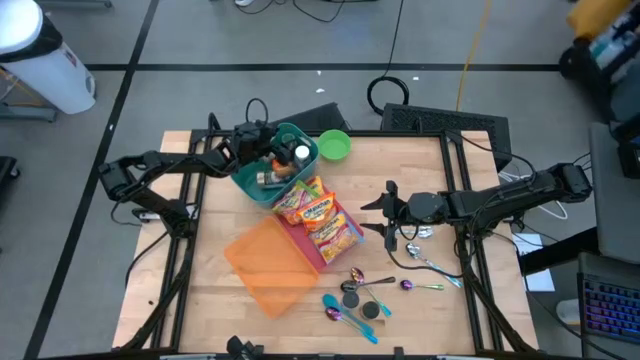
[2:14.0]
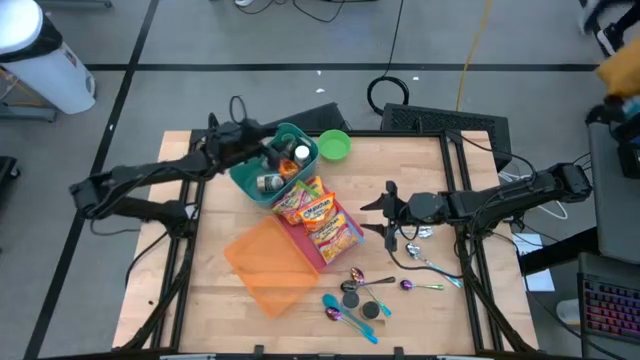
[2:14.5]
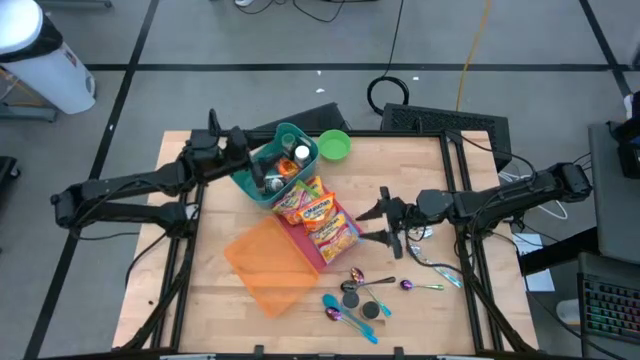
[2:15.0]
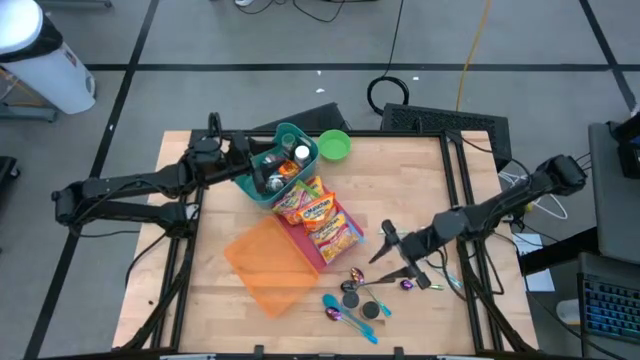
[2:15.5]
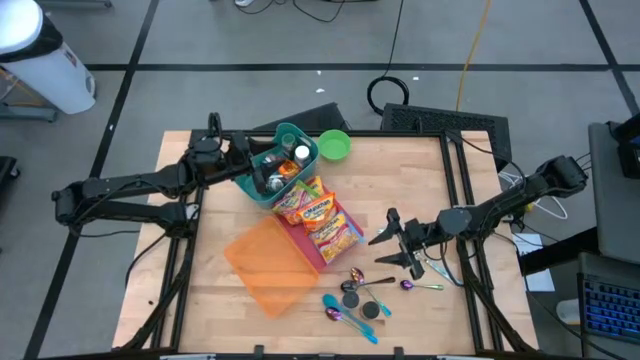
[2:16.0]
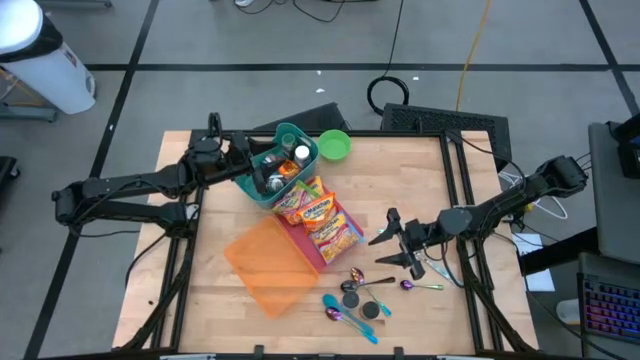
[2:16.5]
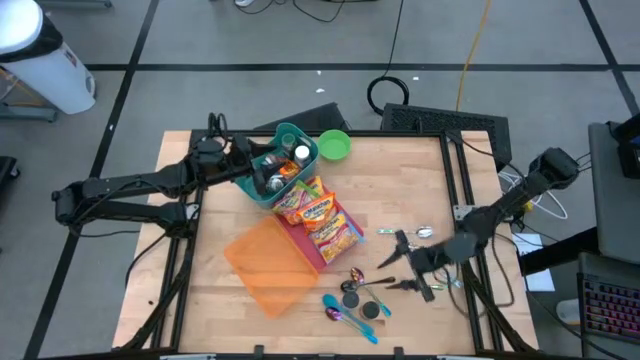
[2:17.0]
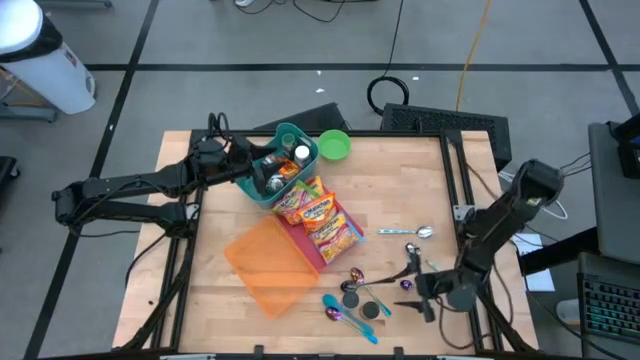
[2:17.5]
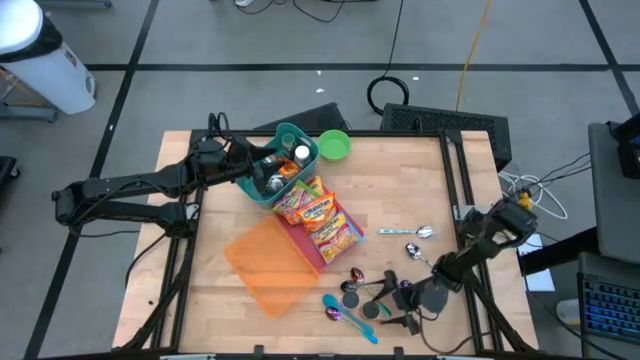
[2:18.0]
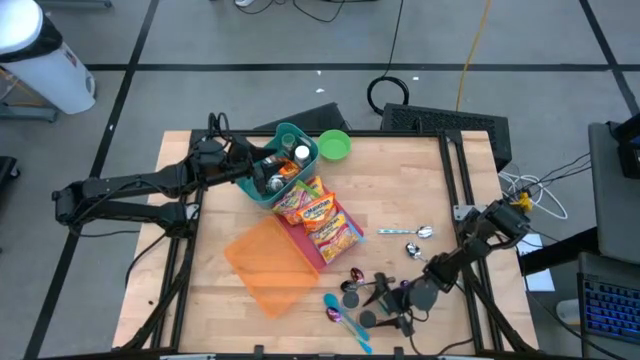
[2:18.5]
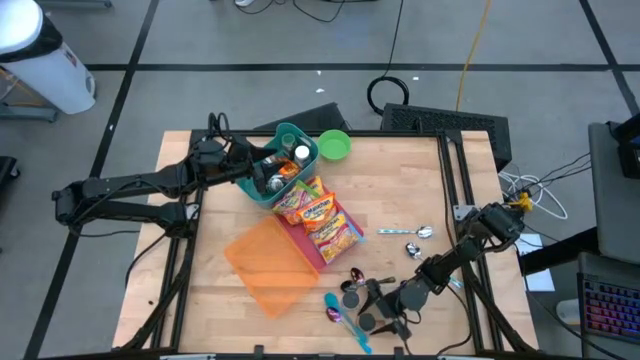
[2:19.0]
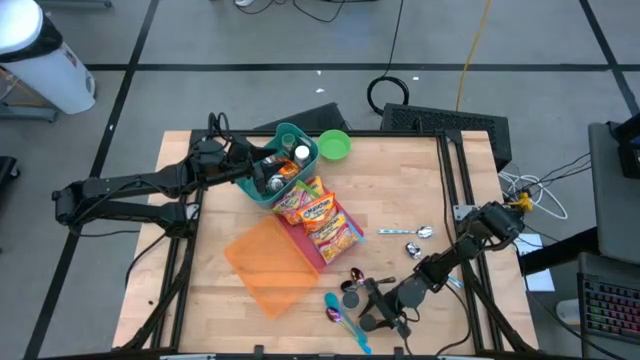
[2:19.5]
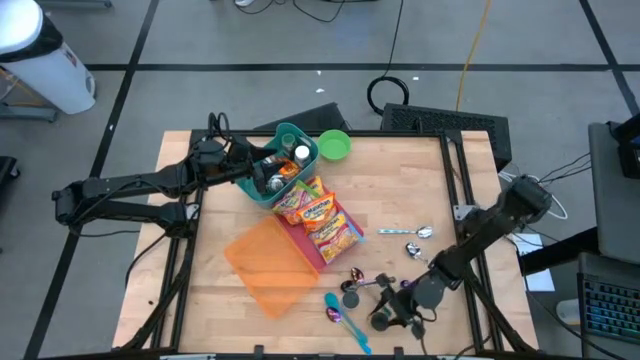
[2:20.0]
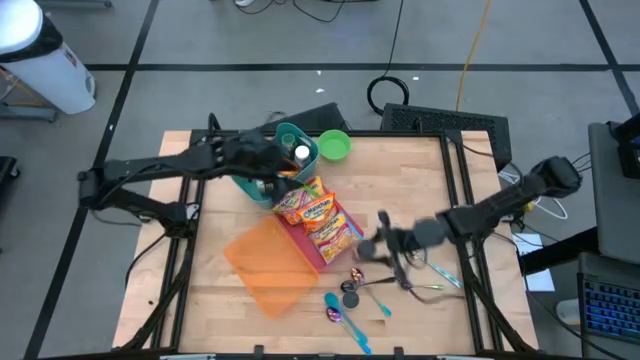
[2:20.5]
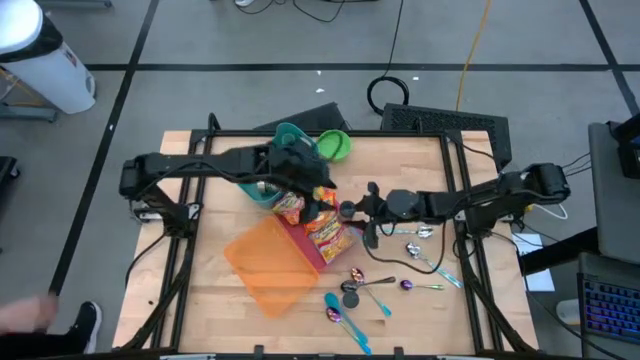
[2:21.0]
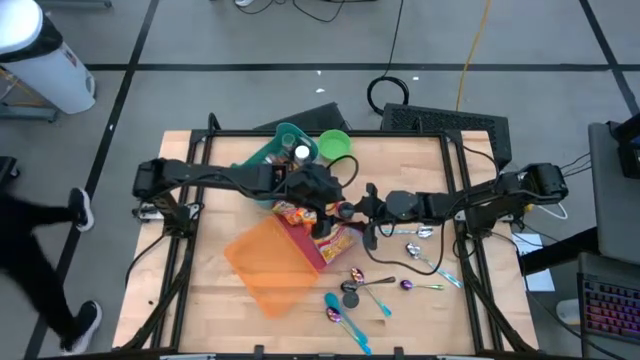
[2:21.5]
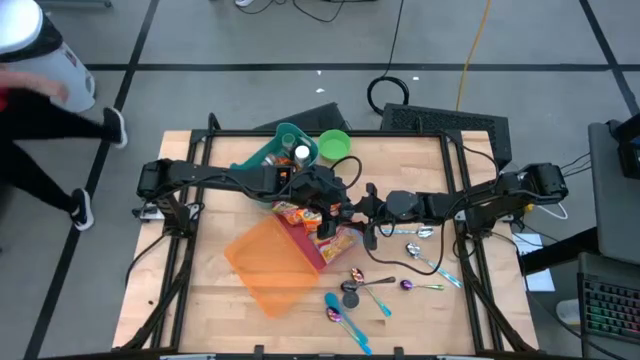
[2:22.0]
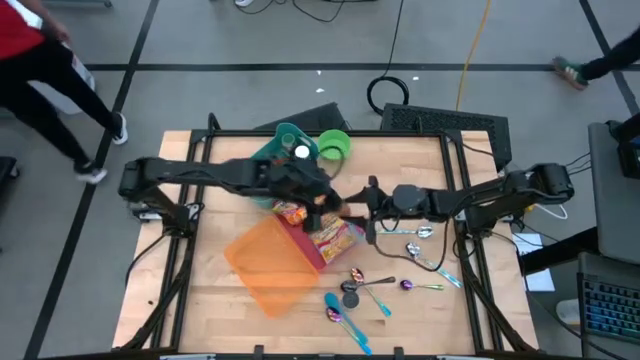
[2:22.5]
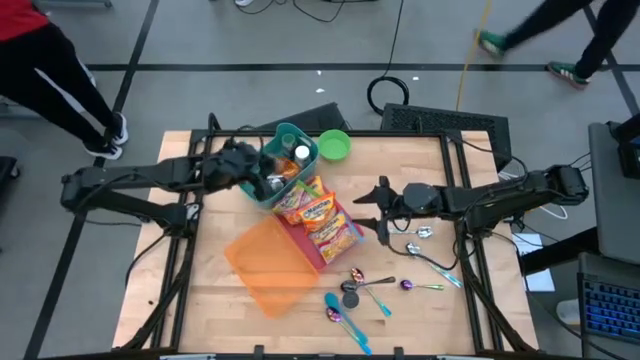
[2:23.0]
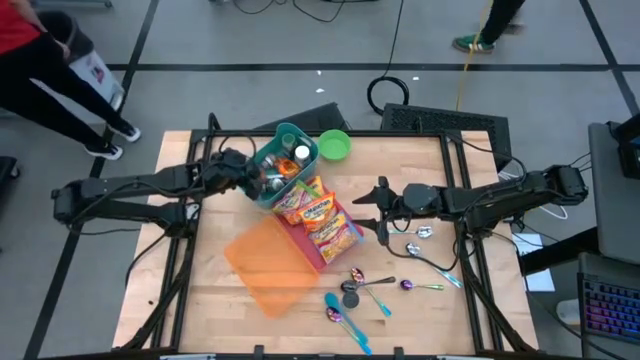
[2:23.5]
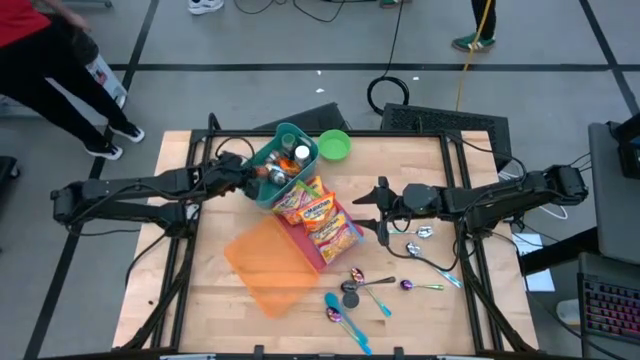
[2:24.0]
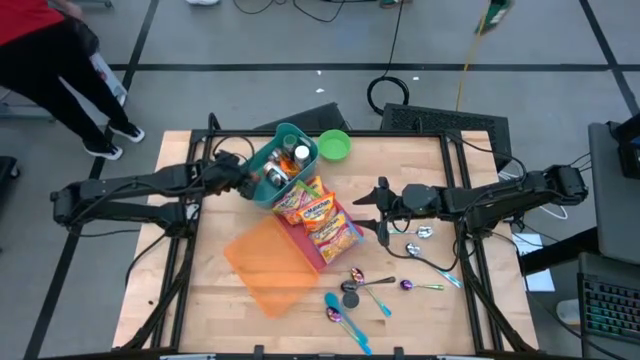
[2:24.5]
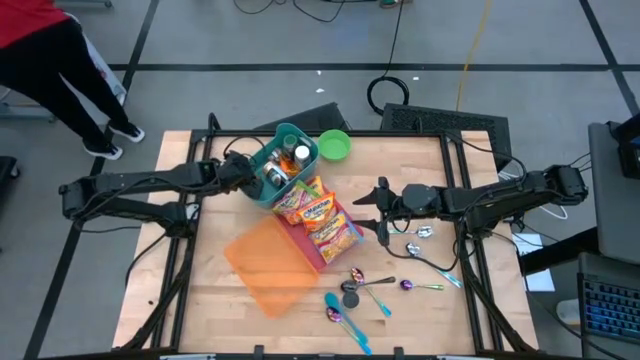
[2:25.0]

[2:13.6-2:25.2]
Task: Pick & Place Food Item
Put the black orange seasoning bottle into the green bin

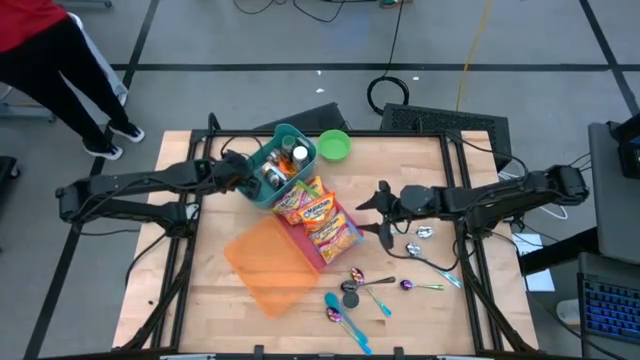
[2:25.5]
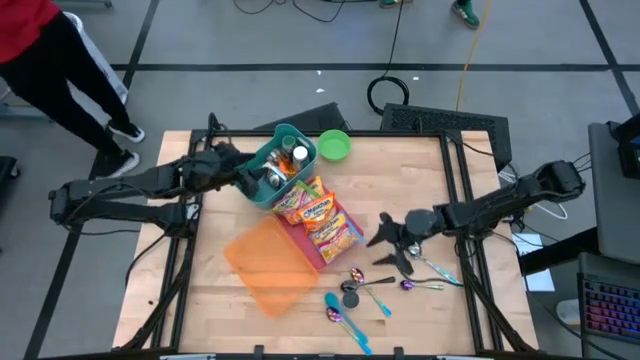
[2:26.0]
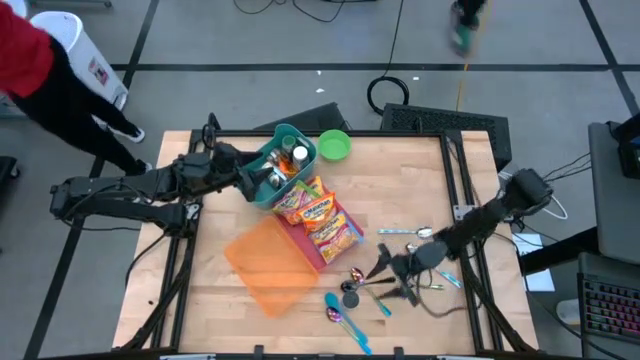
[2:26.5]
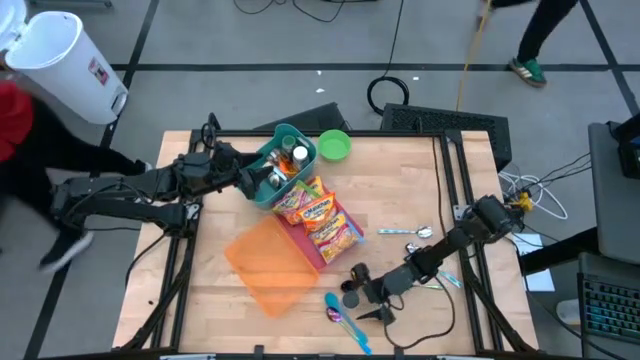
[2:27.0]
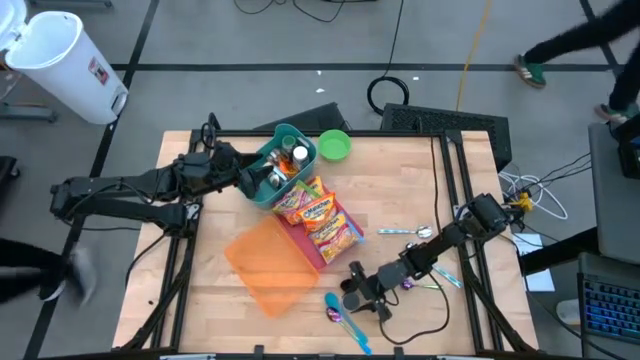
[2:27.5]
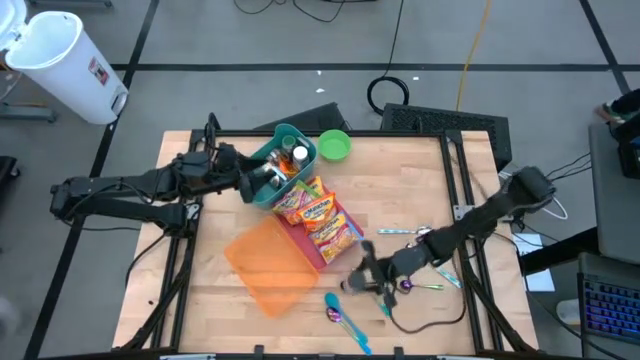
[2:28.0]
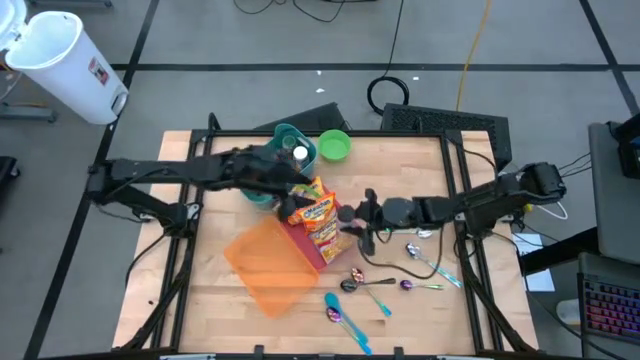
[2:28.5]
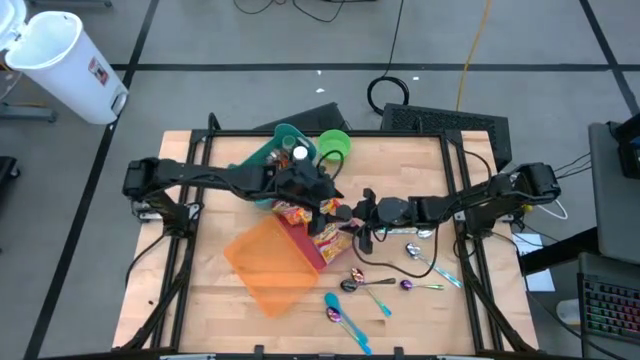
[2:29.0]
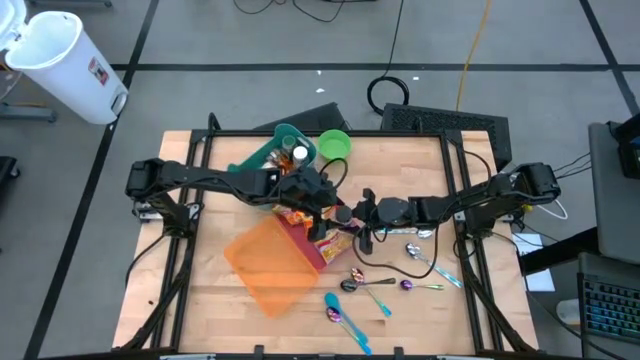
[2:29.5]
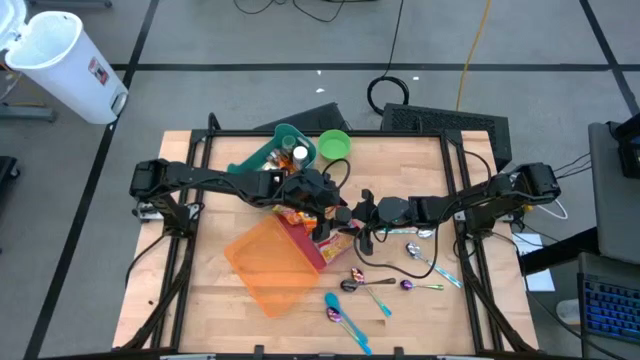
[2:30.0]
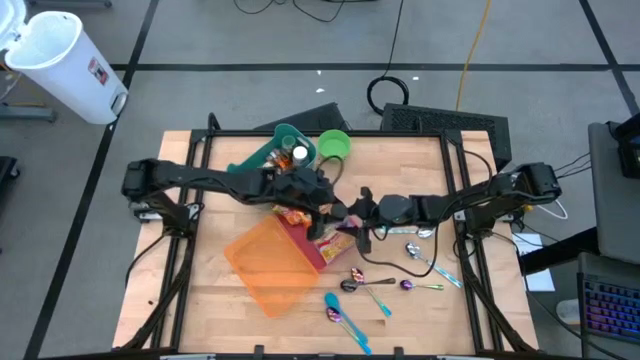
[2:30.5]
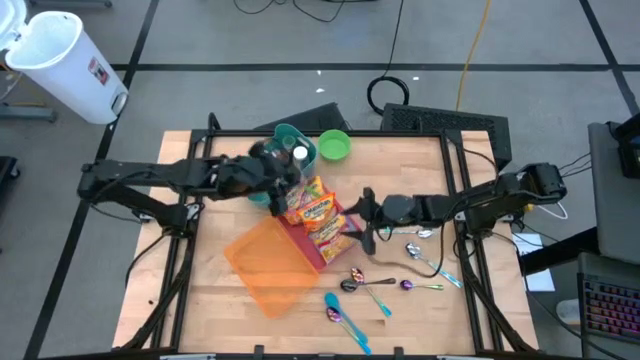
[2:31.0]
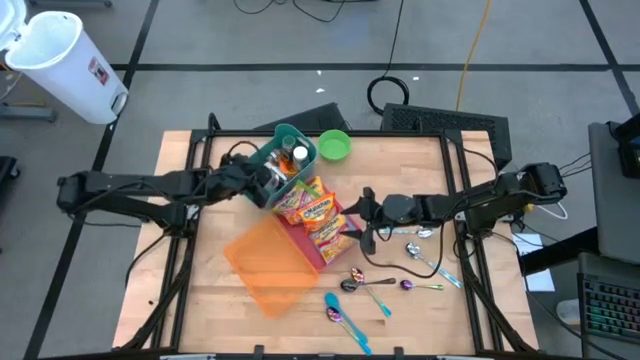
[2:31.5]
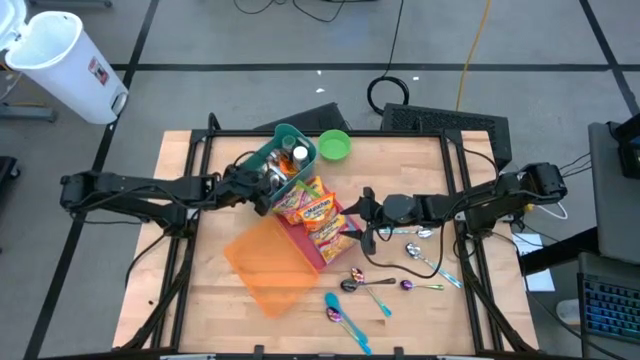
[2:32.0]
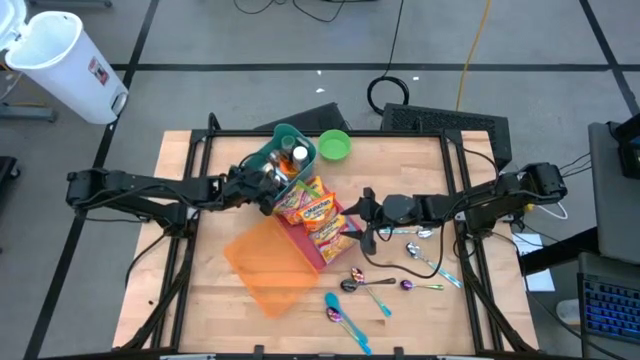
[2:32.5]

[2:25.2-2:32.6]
Put the violet seasoning bottle into the green bin
